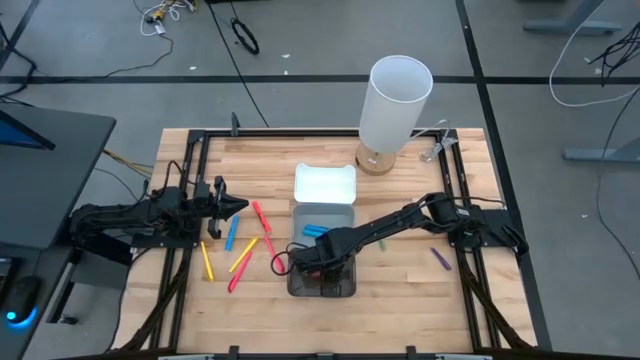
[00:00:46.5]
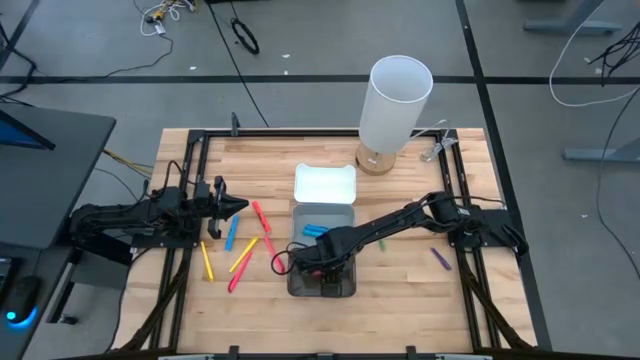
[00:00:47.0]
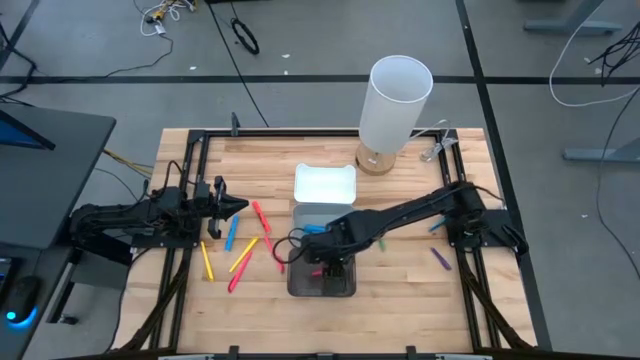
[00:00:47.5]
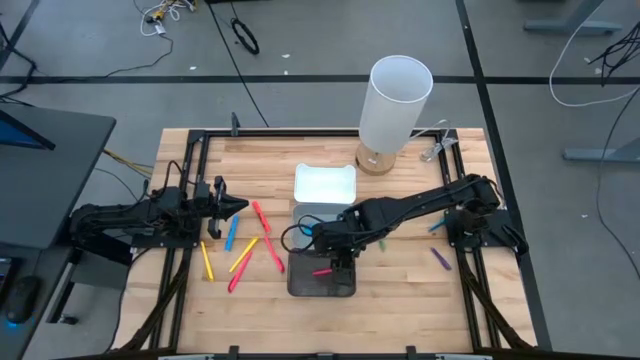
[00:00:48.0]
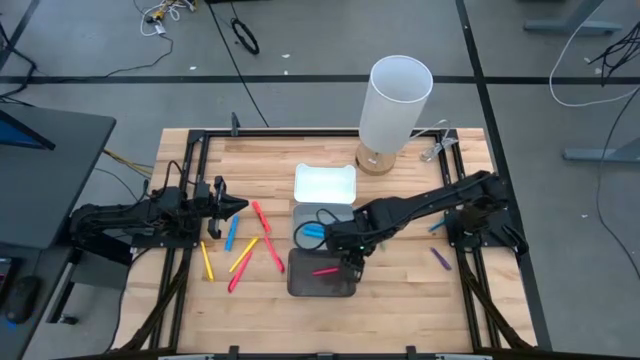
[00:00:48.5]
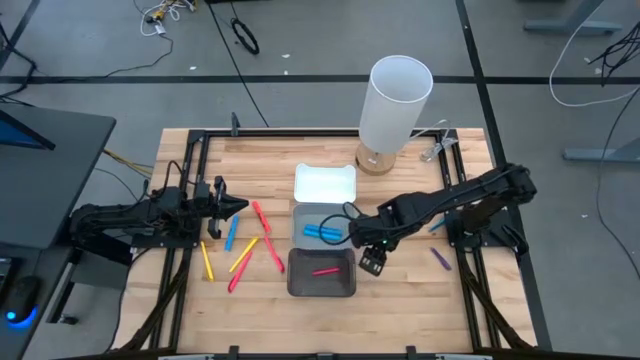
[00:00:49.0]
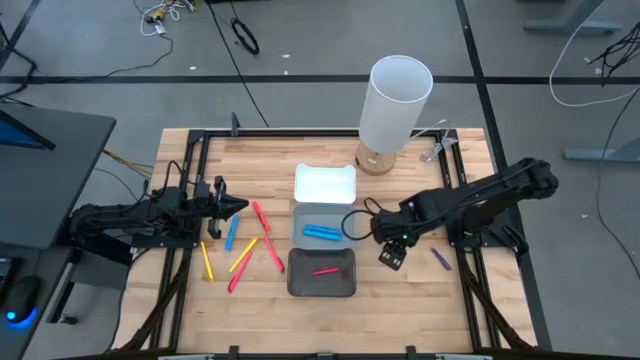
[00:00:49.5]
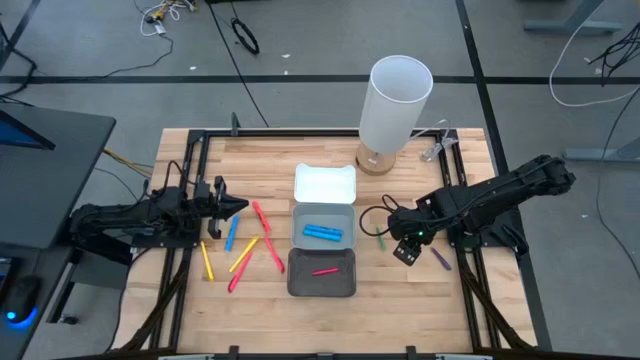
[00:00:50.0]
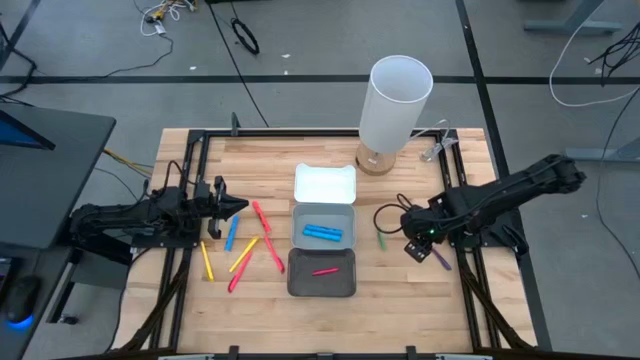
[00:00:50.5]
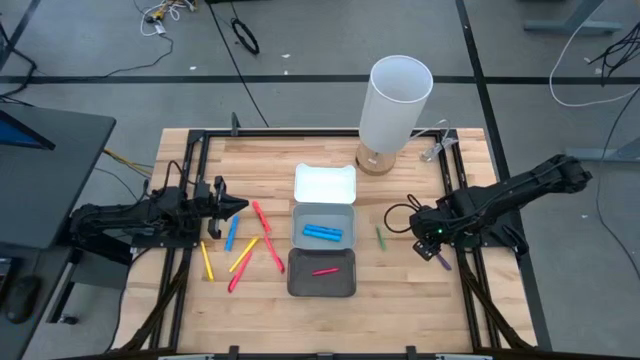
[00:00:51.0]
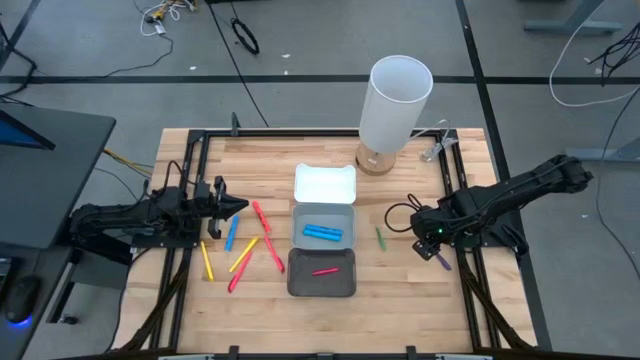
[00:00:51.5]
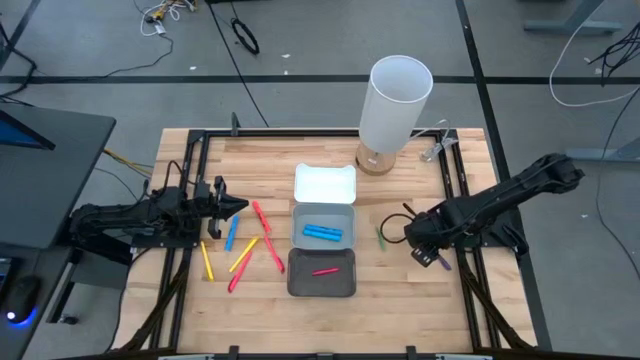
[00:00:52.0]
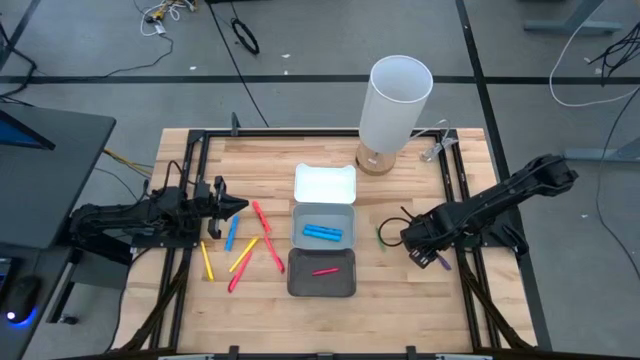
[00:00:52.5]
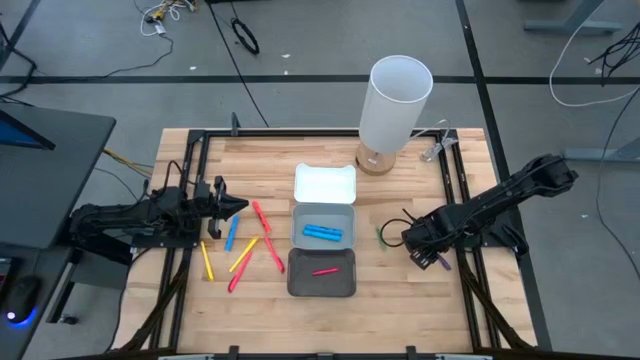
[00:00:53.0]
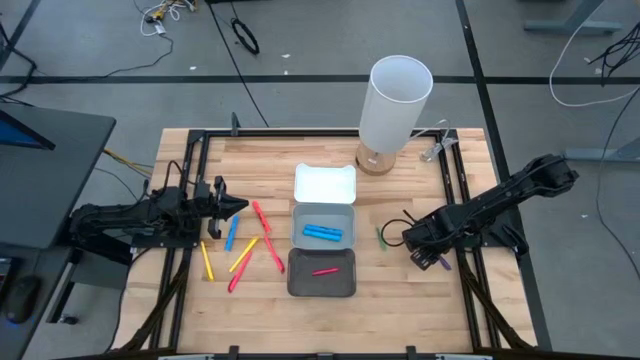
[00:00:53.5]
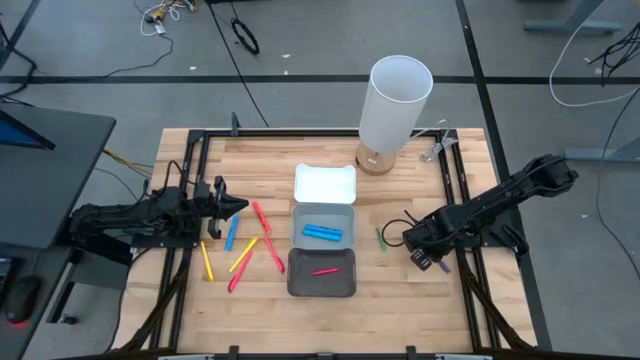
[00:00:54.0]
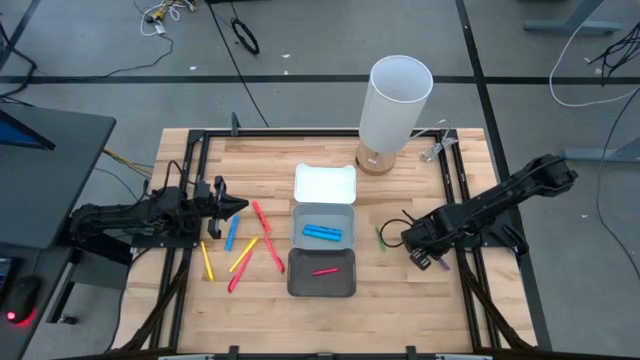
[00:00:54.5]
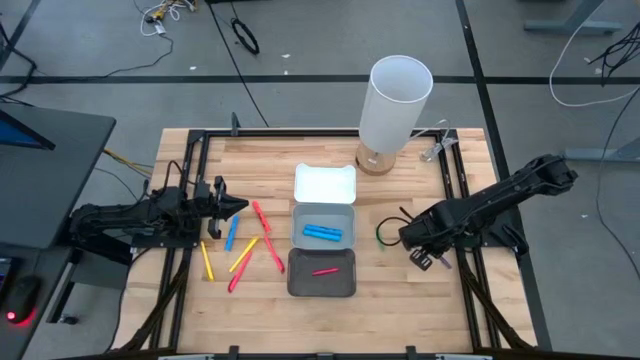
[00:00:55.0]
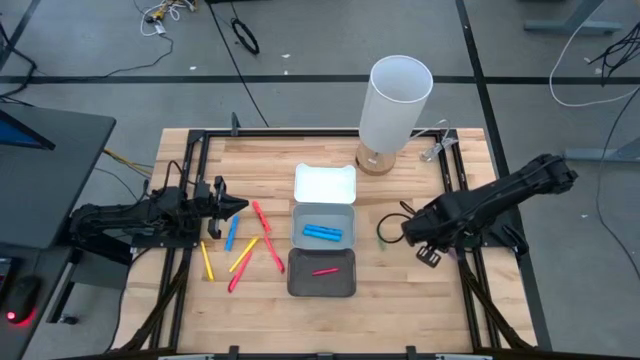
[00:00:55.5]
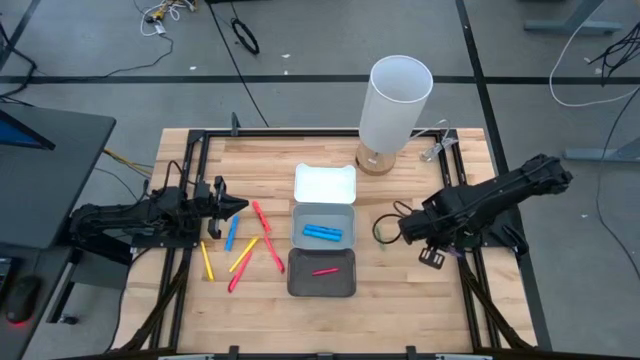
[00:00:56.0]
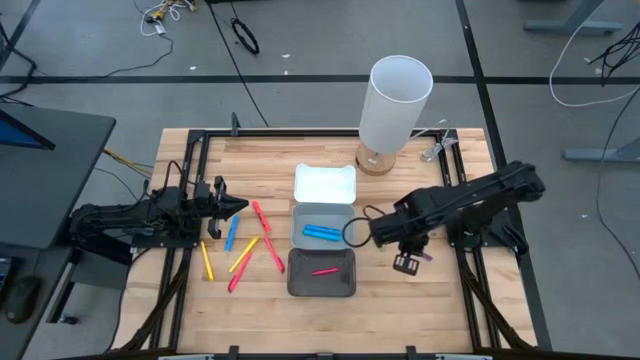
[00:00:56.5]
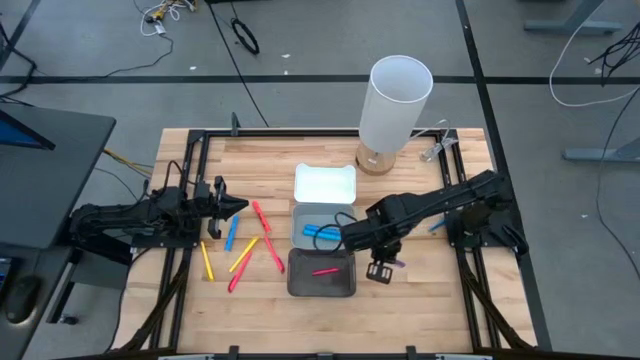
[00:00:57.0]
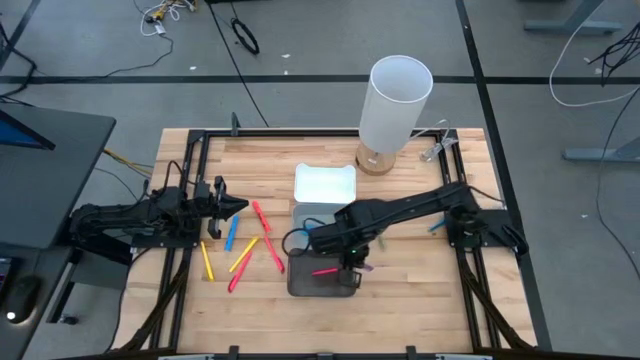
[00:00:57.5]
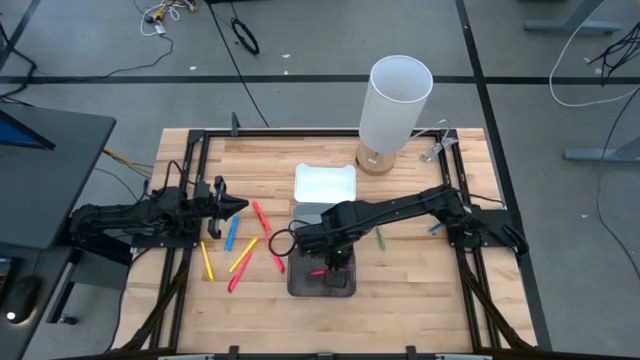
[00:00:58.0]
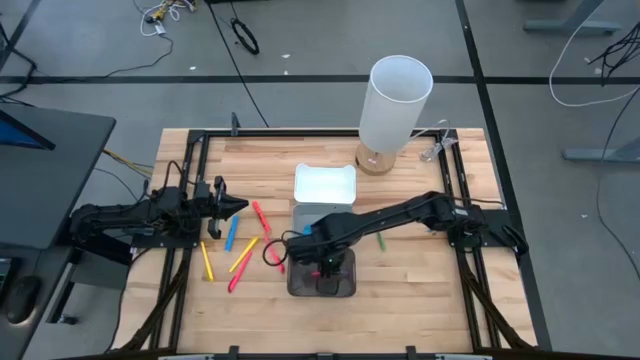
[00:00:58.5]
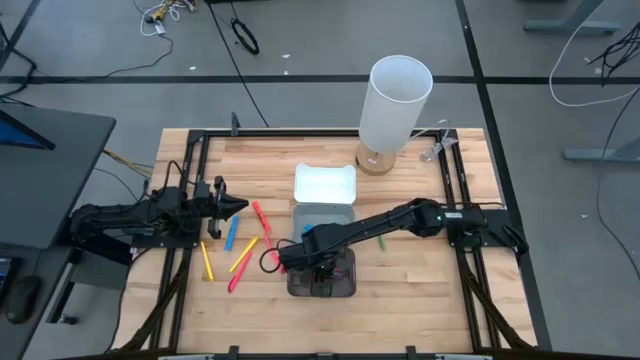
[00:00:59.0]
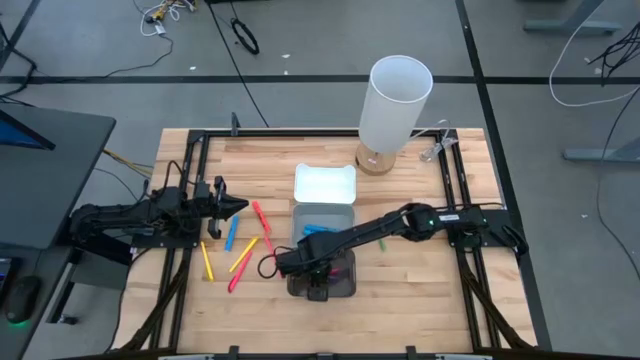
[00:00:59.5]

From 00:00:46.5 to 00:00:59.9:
Task: Pick & Place Markers
Put the violet pen into the black transparent bin

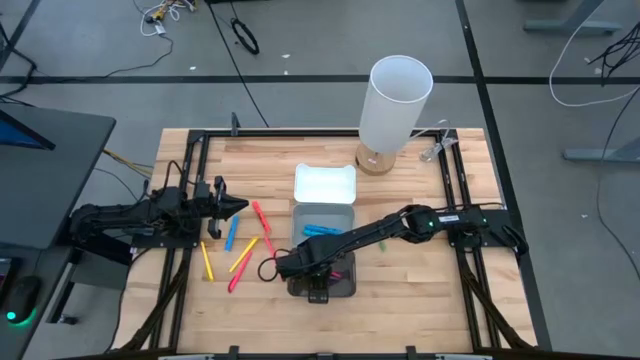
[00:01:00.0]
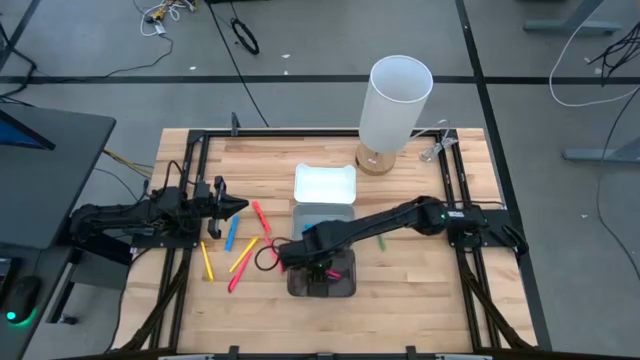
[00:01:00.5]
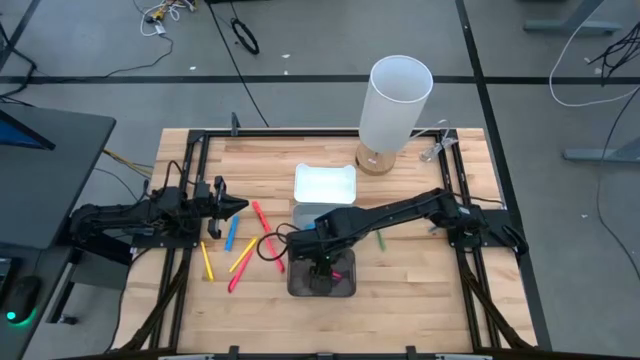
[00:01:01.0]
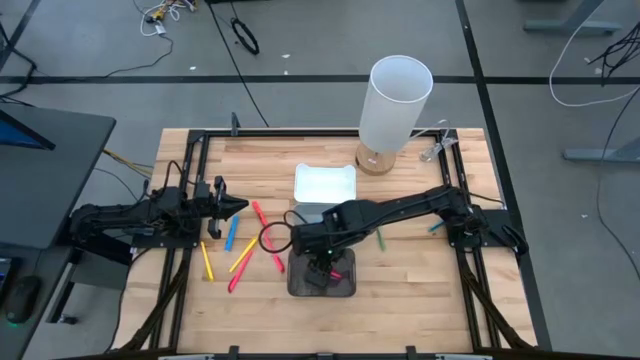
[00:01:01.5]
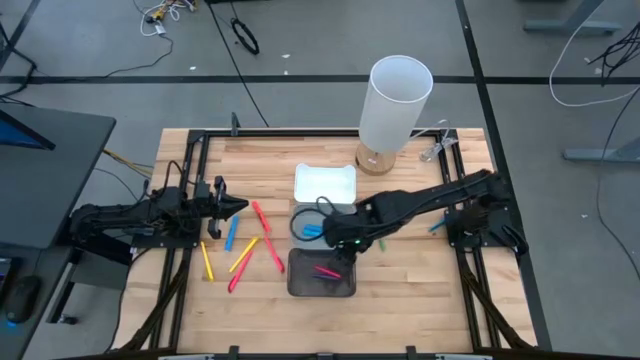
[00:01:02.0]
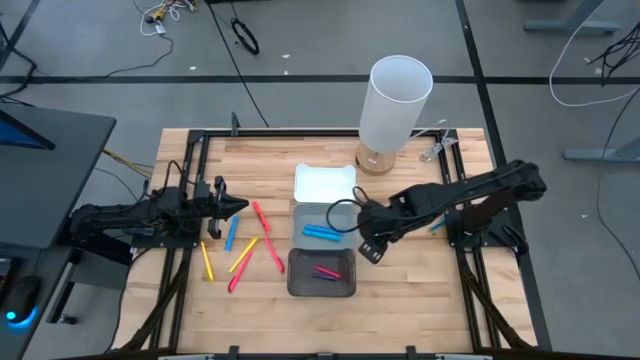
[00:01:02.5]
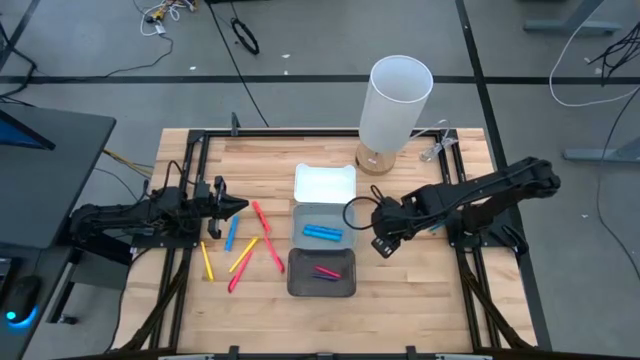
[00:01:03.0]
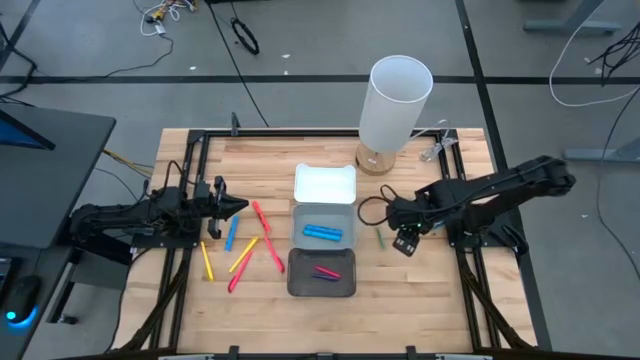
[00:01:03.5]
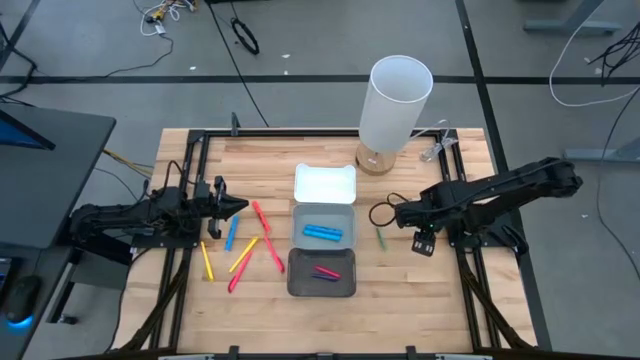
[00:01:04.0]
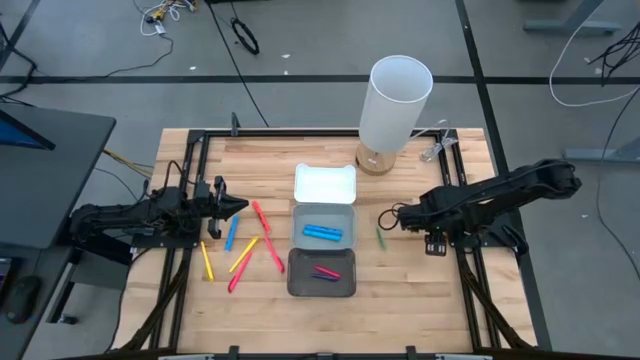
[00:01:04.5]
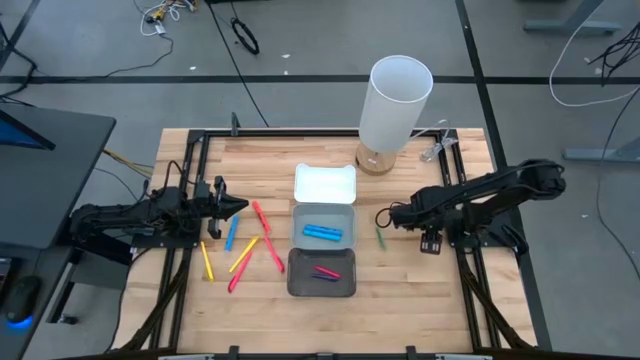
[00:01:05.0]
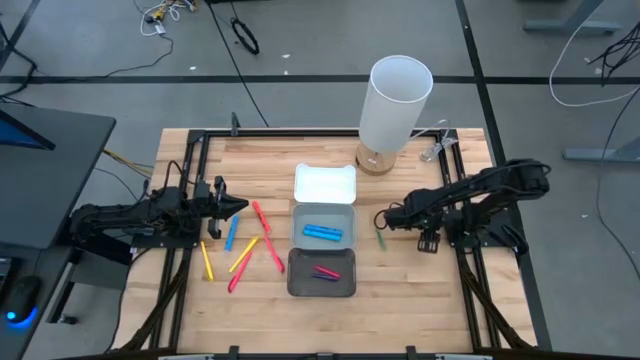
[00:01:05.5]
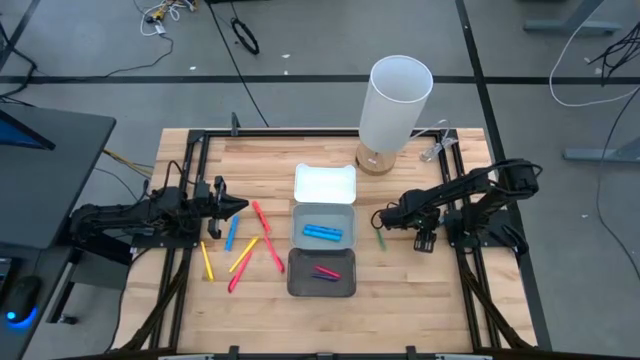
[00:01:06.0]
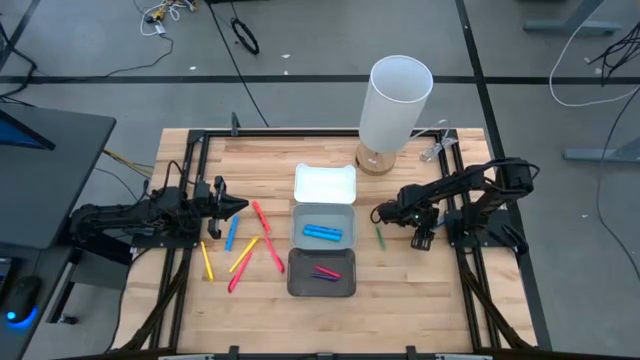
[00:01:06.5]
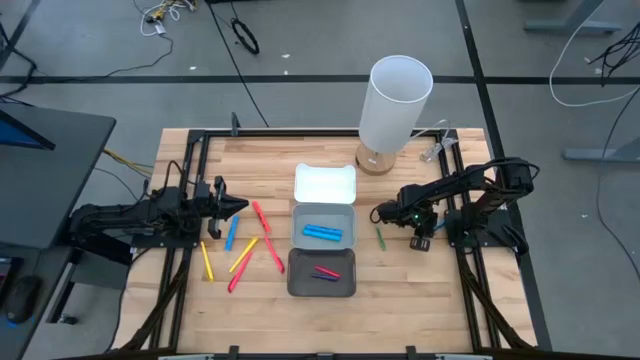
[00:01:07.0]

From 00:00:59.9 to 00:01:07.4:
Put the blue pen into the black transparent bin
